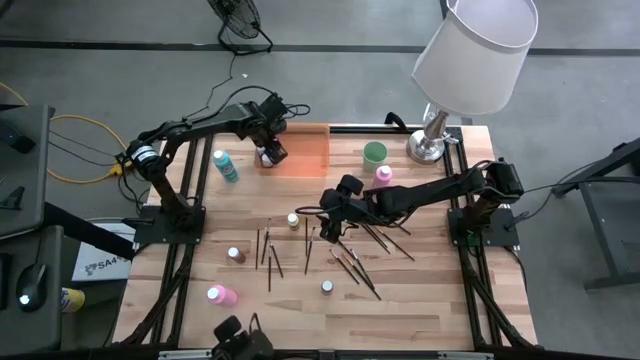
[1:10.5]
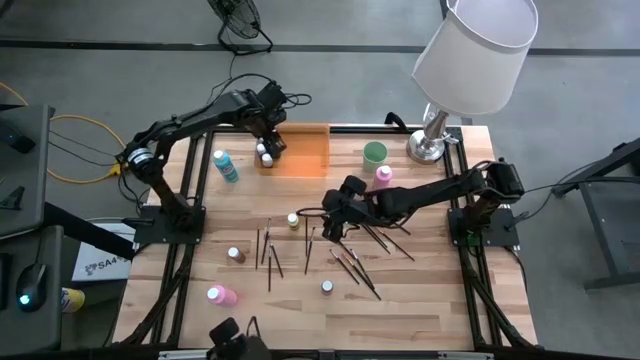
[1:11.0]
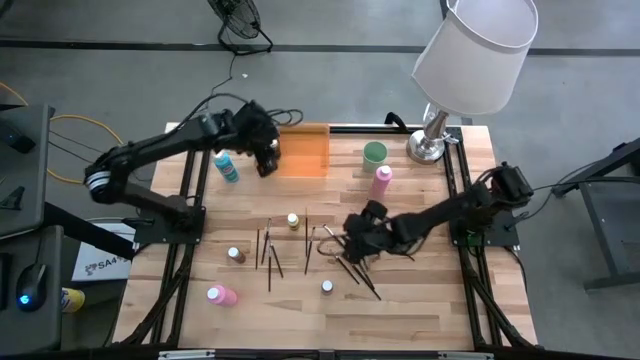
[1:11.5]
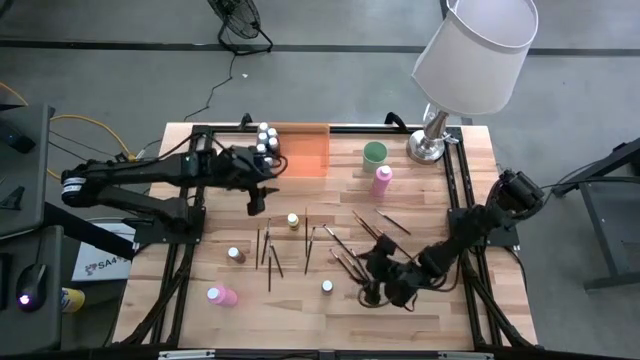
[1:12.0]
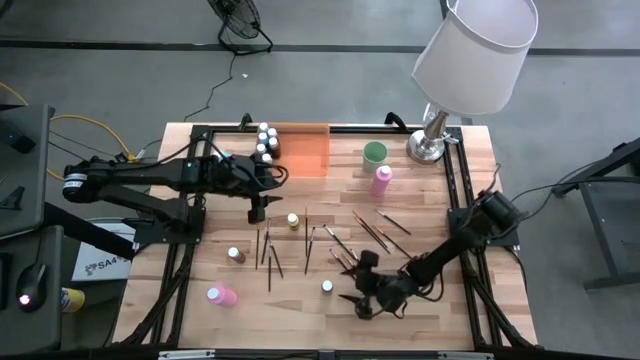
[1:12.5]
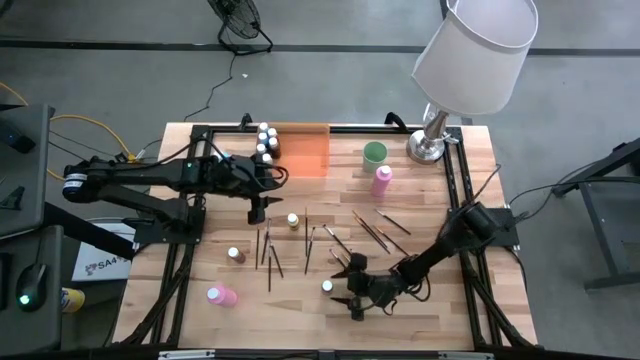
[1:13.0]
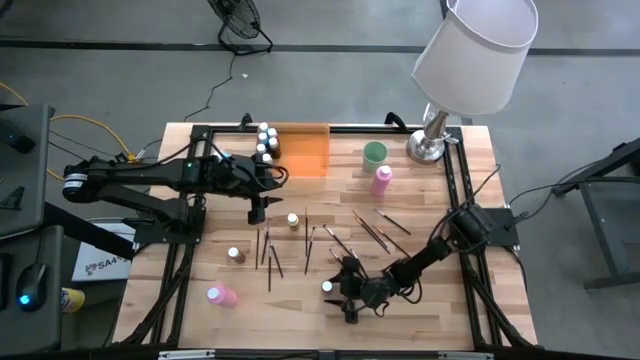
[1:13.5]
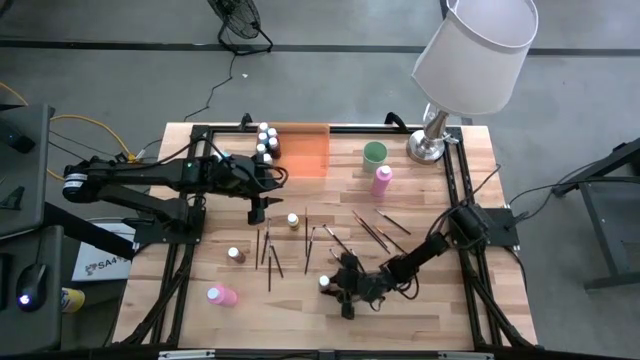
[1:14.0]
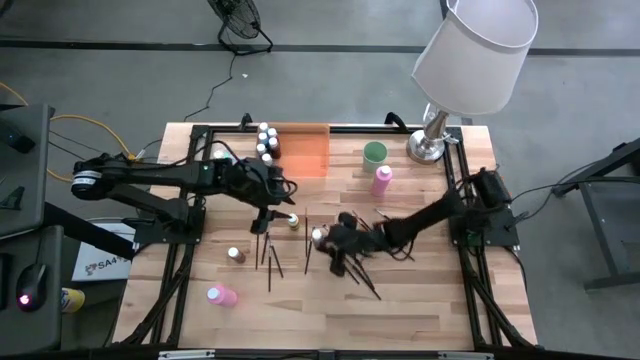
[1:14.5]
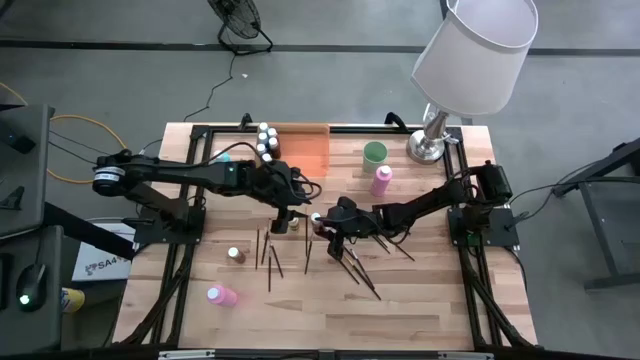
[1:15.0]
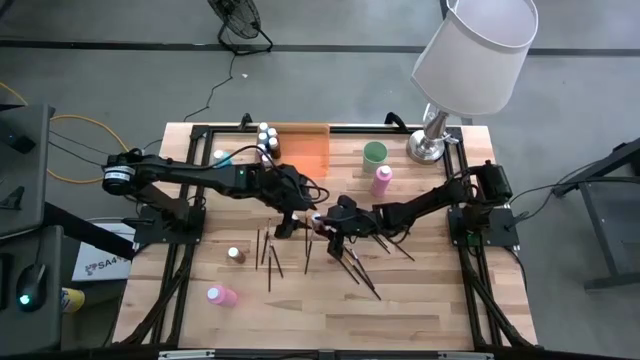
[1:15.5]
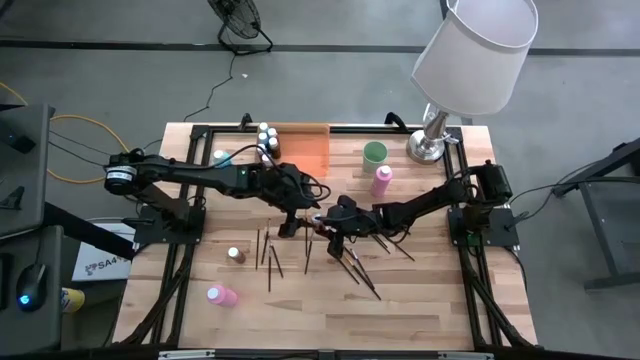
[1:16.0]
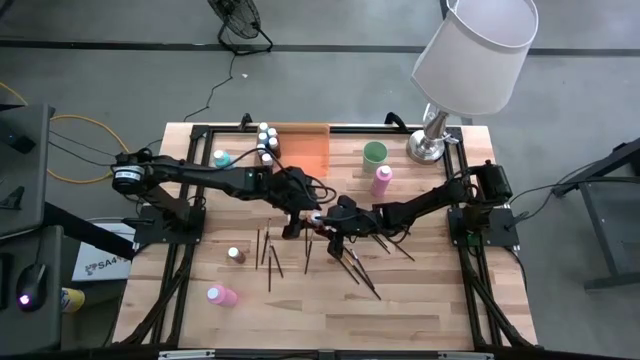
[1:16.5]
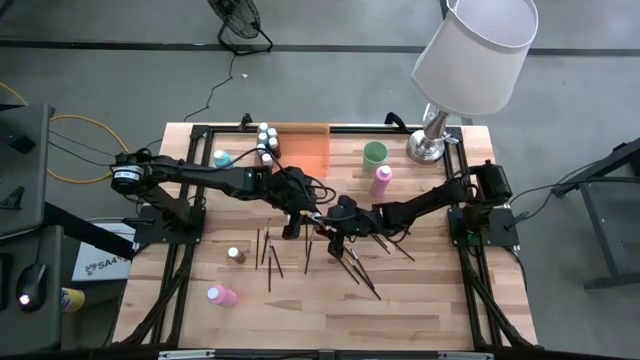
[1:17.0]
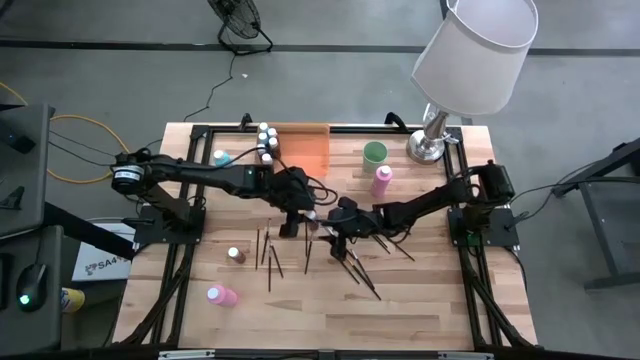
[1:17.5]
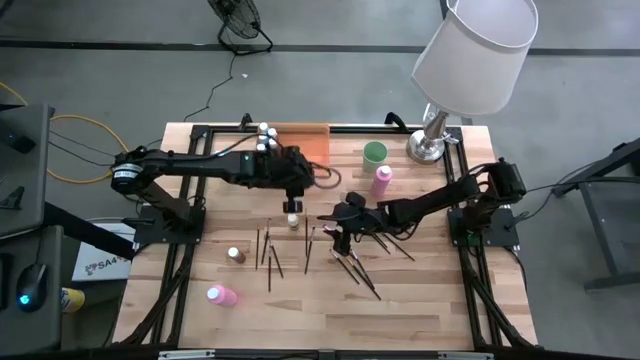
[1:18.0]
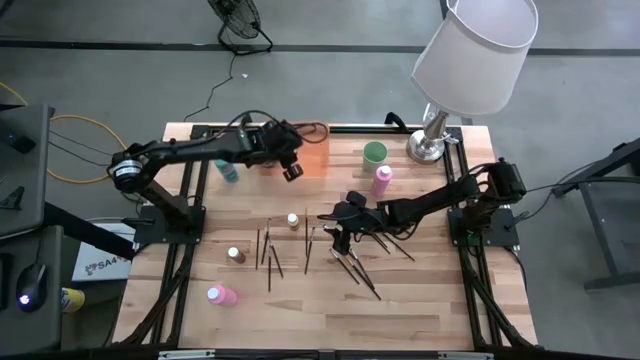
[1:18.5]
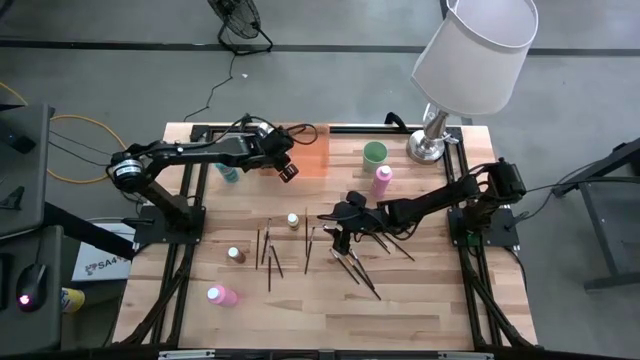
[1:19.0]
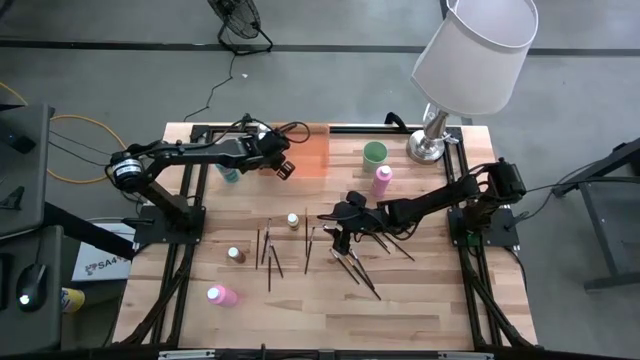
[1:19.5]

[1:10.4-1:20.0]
Task: Pick & Place Paint Supplies
Put the brown paint bottle into the orange bin

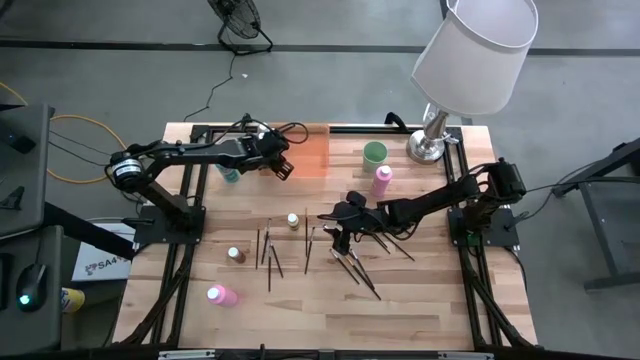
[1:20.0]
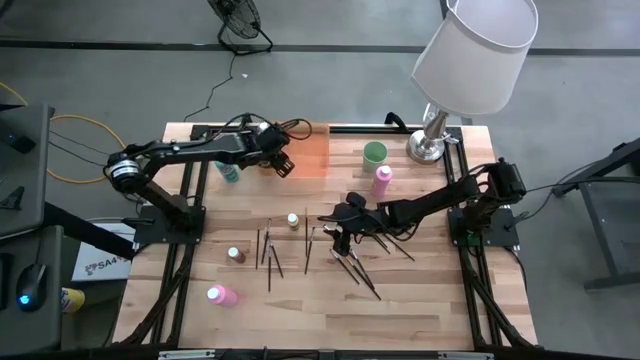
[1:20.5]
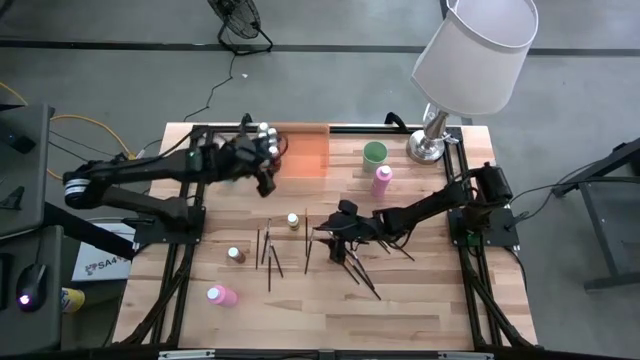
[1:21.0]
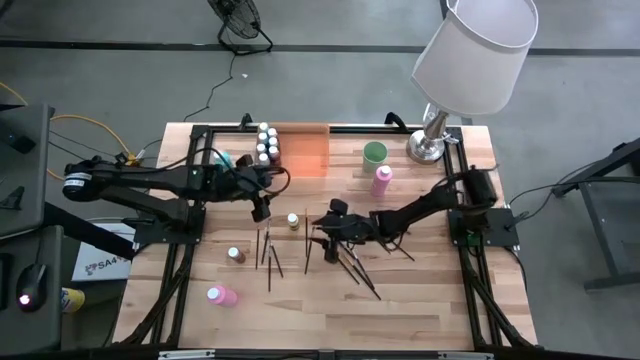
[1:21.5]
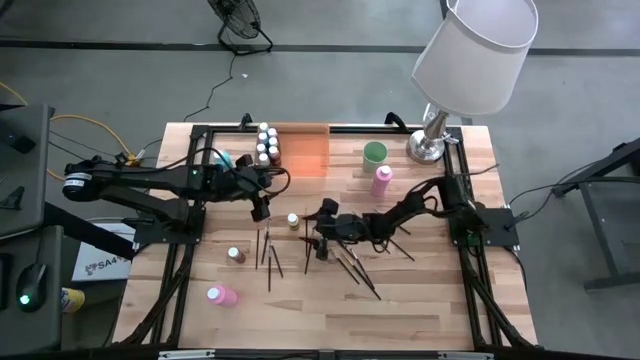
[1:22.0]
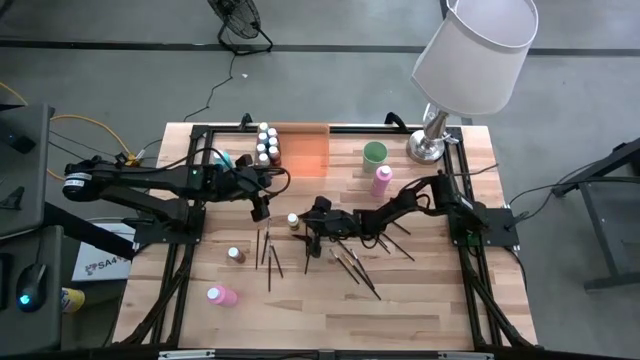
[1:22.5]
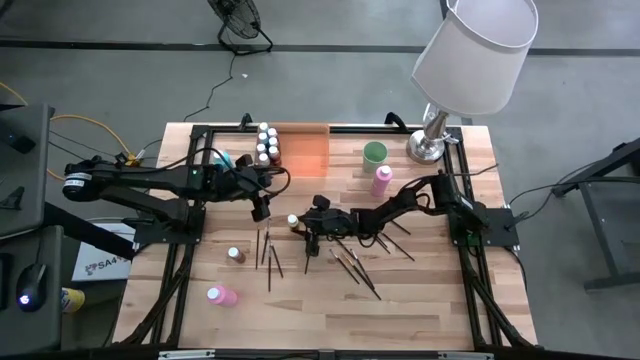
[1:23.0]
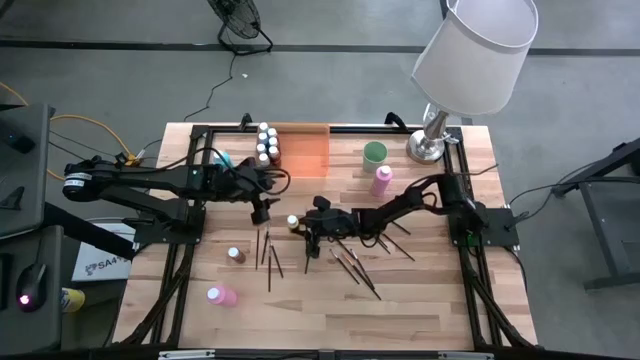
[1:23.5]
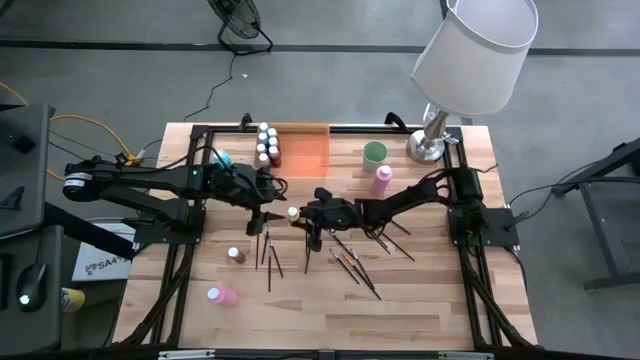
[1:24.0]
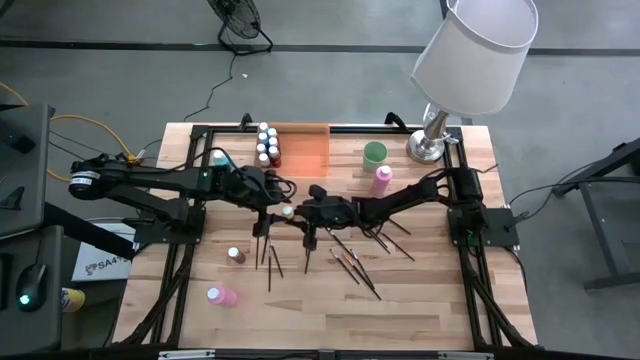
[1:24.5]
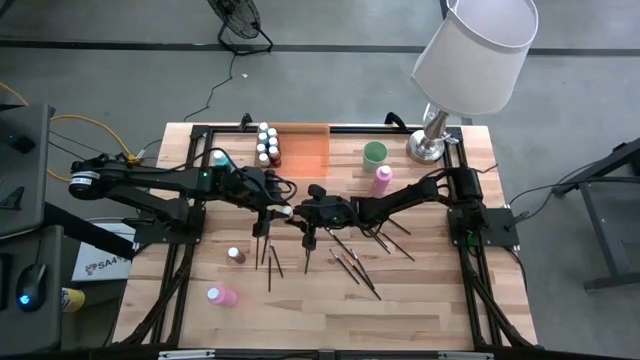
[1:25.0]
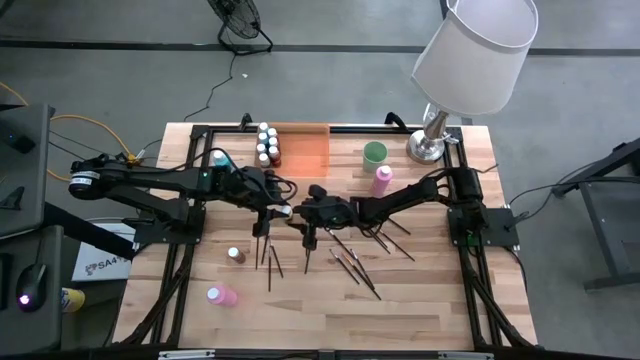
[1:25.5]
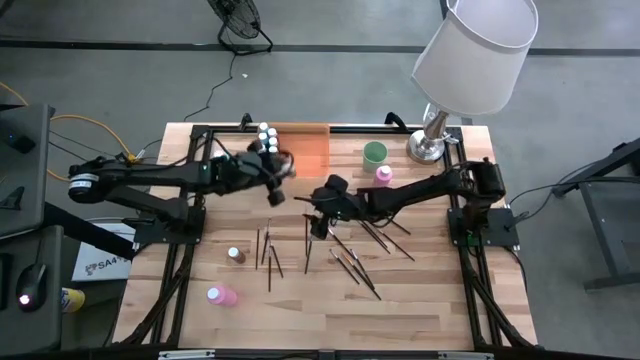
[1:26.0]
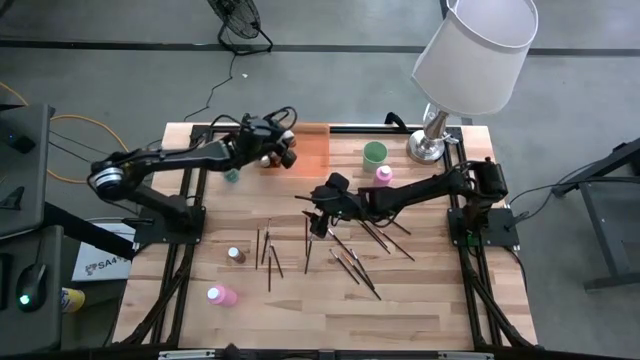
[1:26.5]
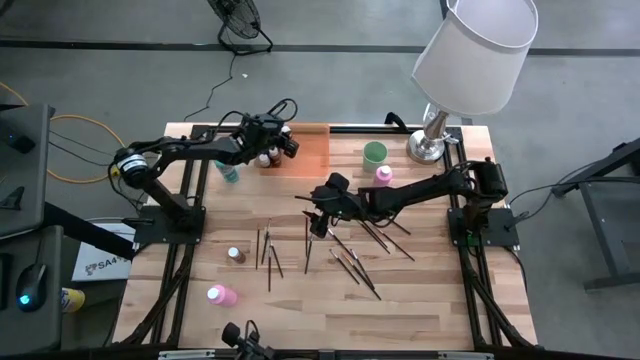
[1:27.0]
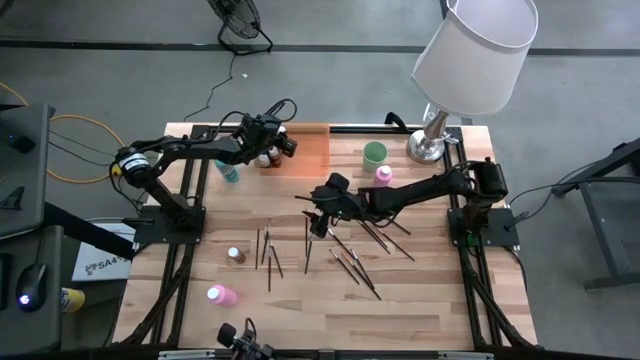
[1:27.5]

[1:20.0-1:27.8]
Put the yellow paint bottle into the orange bin
